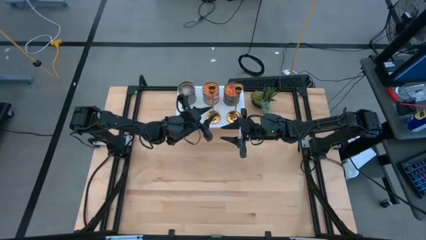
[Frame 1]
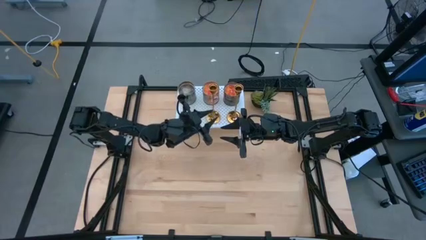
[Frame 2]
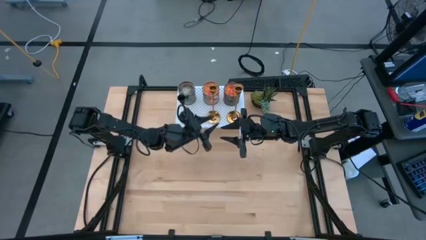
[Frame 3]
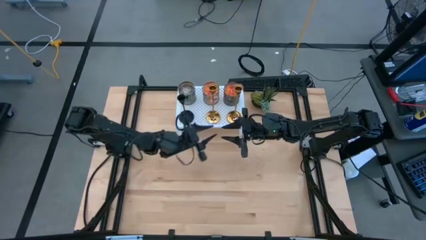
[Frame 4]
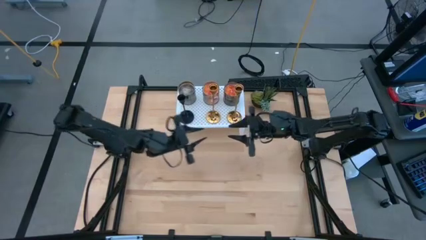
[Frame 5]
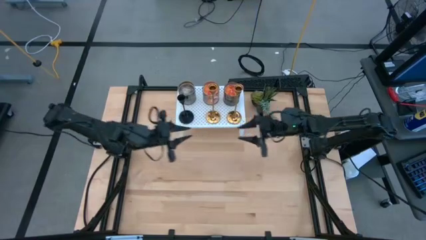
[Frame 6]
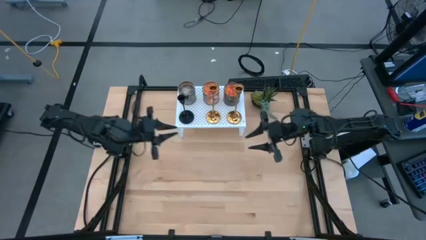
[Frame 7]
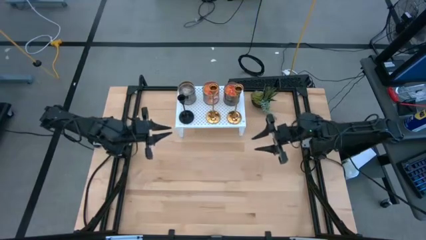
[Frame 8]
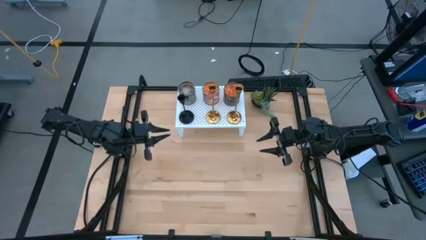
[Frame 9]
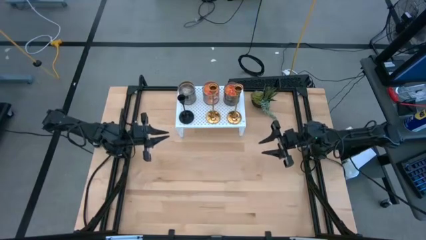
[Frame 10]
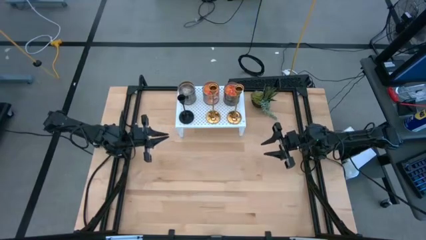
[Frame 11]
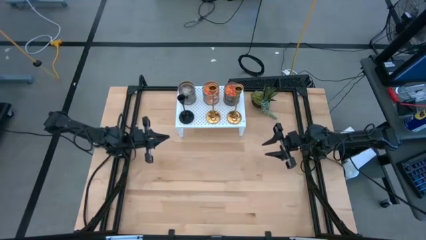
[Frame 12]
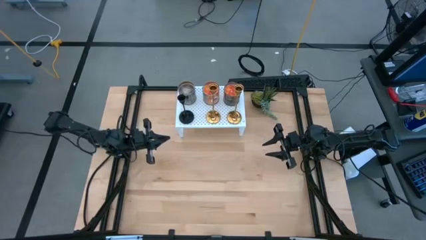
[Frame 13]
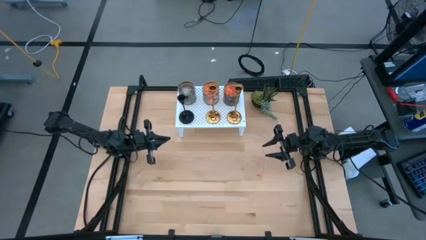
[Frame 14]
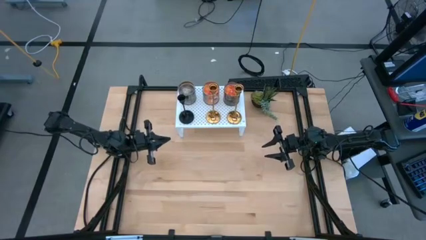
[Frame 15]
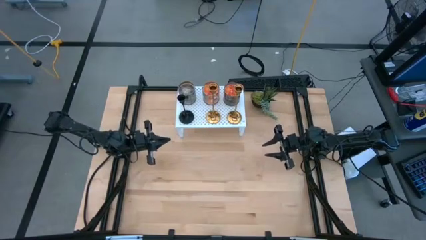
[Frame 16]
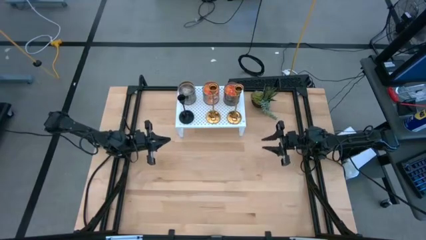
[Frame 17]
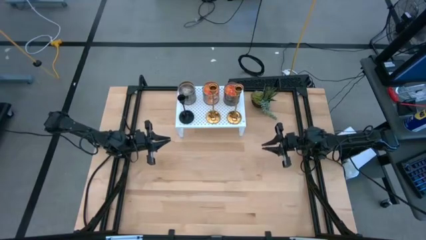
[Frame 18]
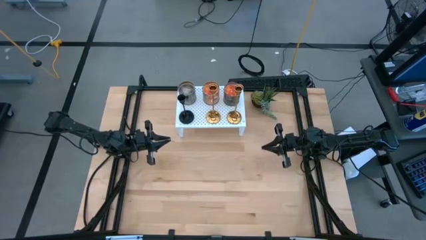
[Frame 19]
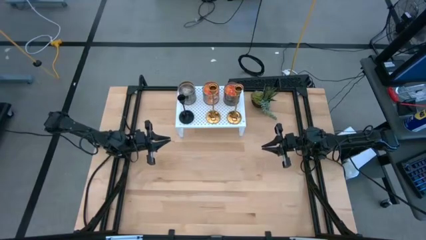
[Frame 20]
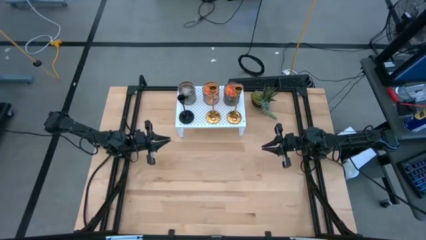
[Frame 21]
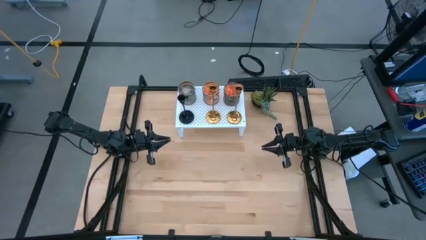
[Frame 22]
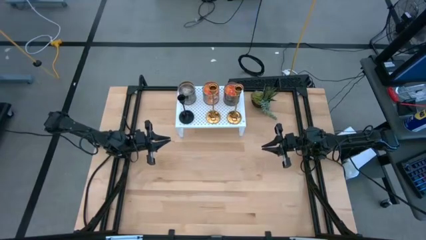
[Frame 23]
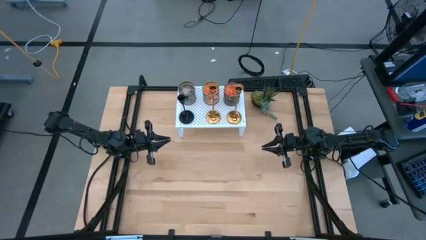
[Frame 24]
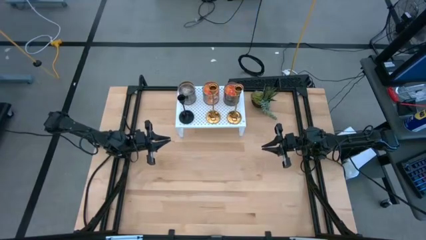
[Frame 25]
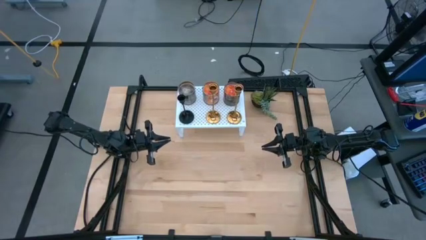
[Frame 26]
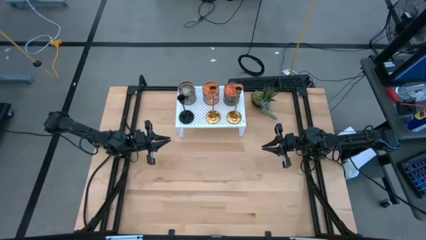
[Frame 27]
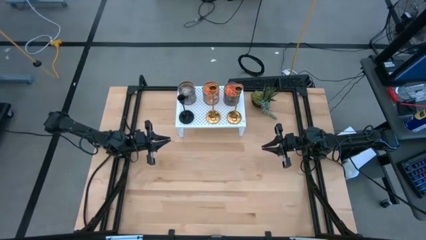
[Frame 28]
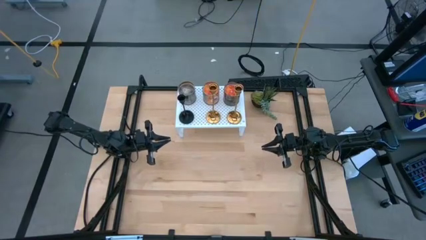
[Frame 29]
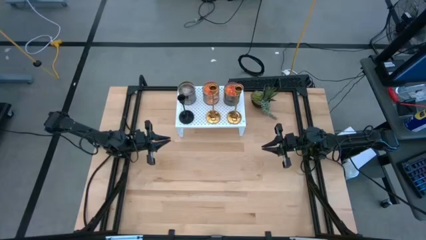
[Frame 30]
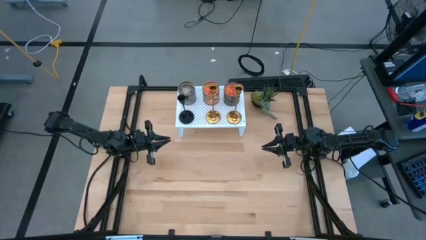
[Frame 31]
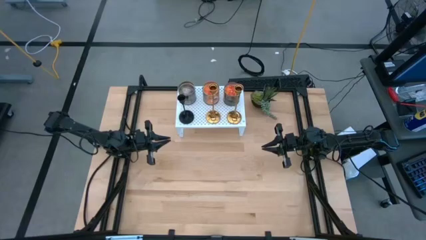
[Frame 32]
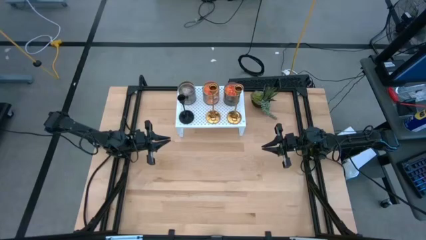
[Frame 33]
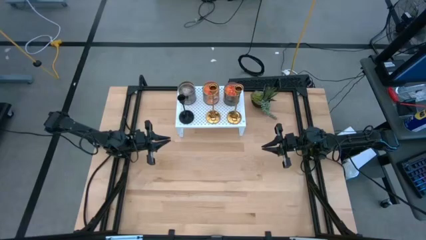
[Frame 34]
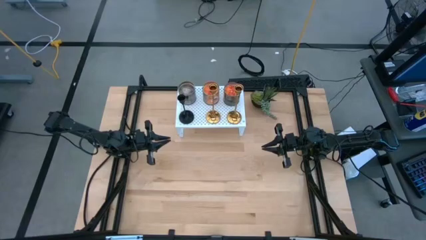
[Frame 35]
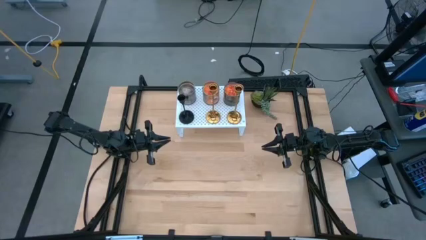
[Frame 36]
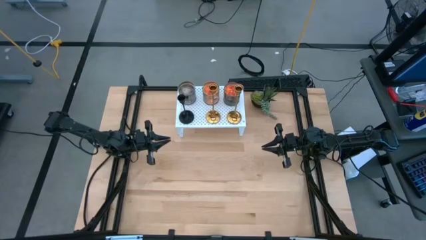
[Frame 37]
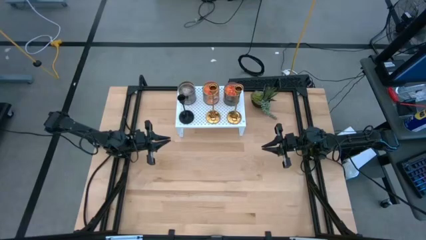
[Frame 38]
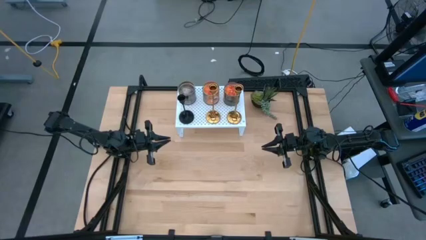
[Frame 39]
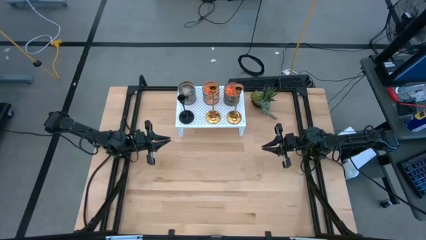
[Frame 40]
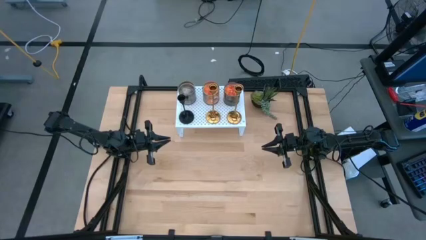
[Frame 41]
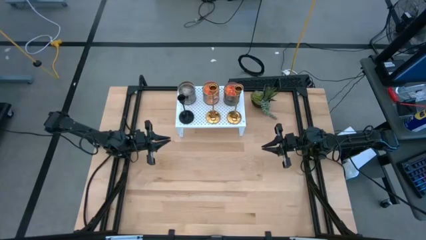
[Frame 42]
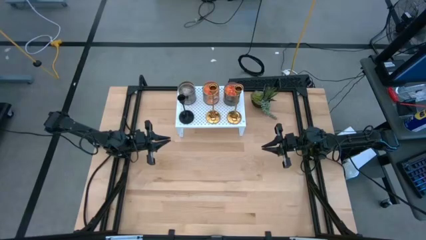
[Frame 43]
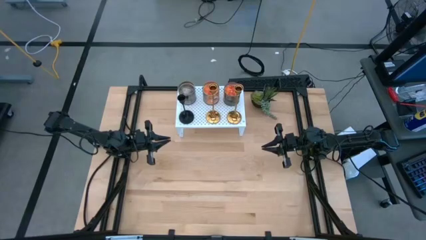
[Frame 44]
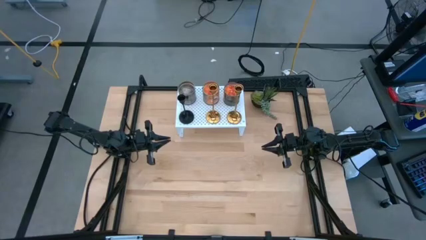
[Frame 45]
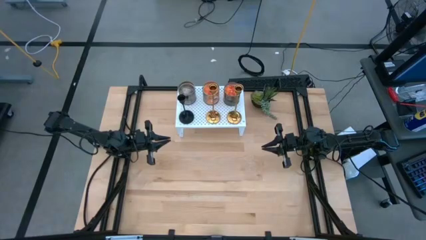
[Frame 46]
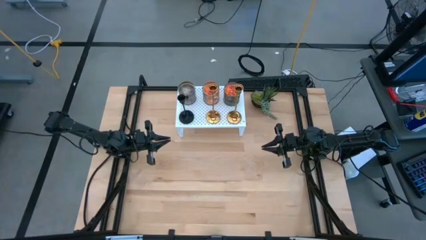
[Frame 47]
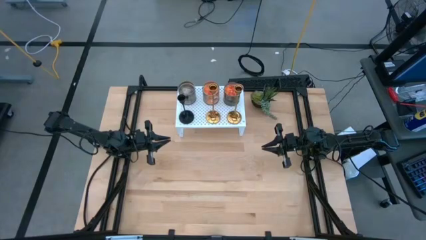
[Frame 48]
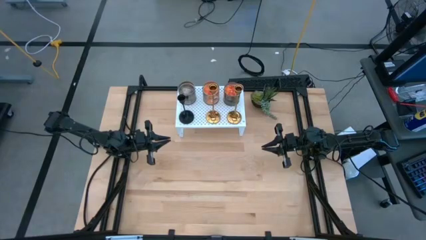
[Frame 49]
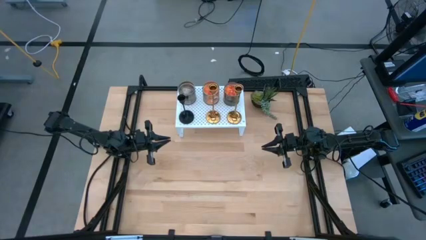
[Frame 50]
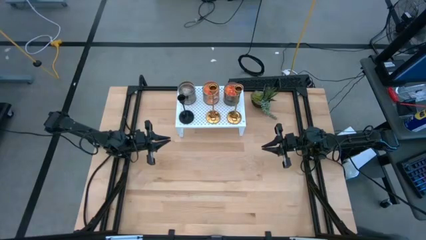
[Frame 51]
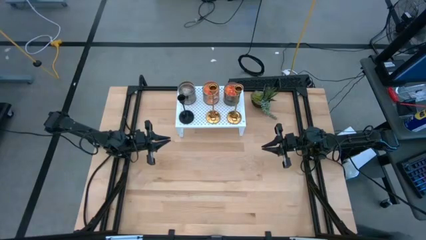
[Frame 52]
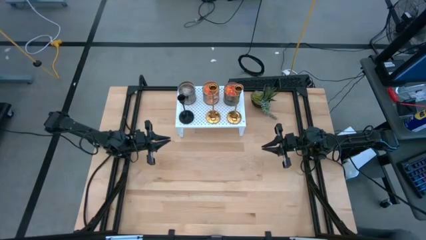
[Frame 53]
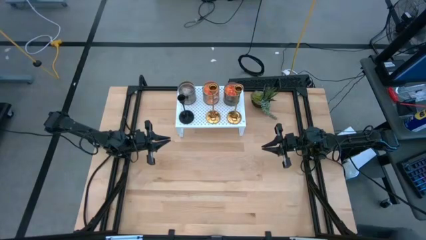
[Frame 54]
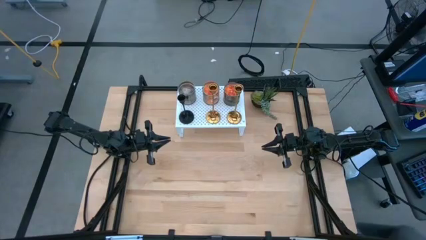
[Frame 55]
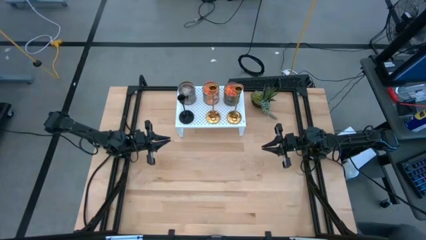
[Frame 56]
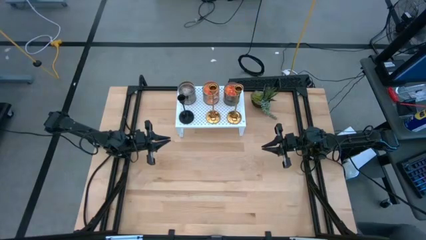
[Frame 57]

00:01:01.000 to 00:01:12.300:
Task: Pick & Place candle stick holders
Return to Home Position

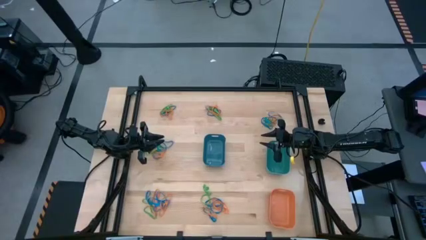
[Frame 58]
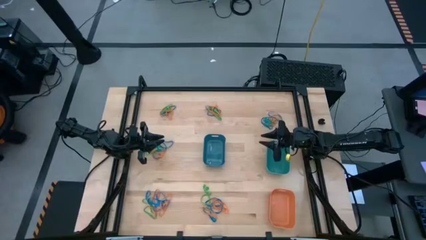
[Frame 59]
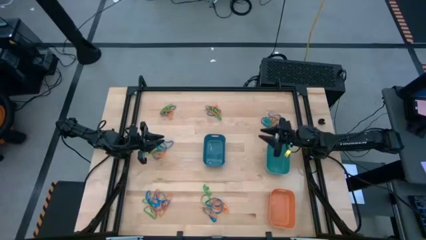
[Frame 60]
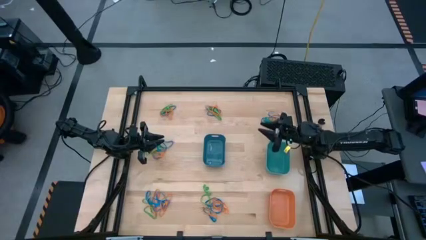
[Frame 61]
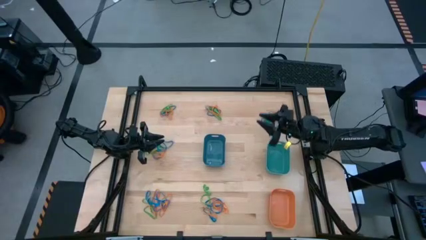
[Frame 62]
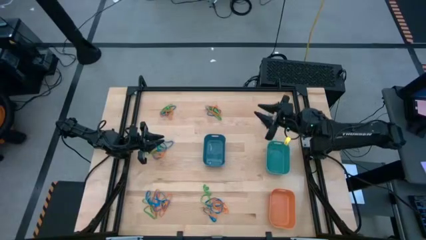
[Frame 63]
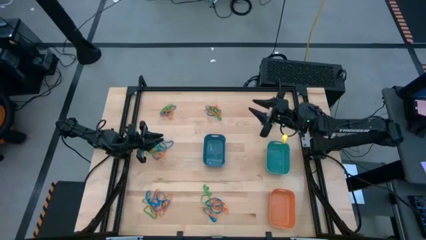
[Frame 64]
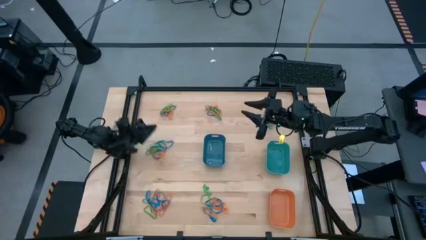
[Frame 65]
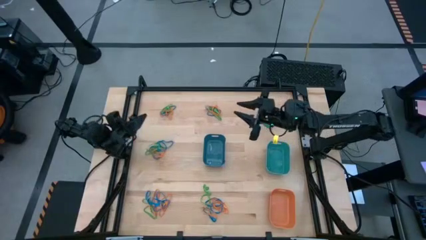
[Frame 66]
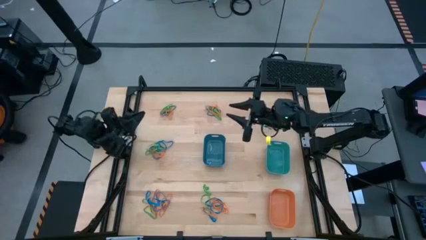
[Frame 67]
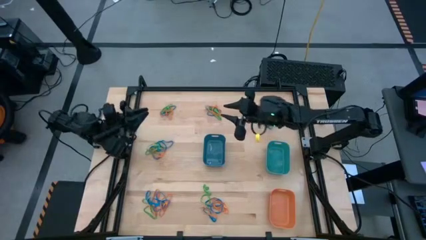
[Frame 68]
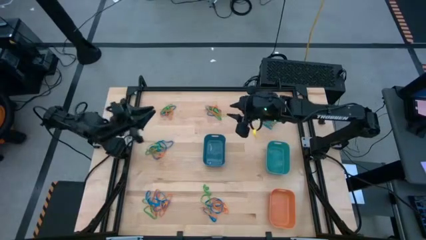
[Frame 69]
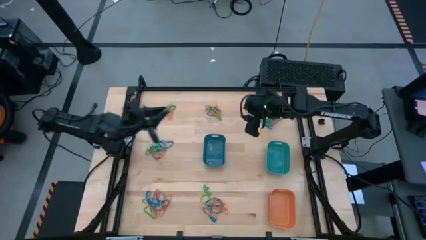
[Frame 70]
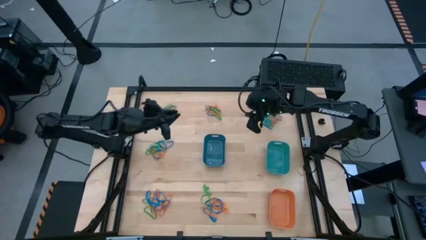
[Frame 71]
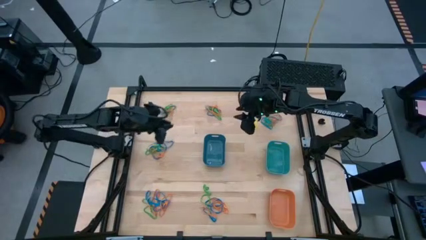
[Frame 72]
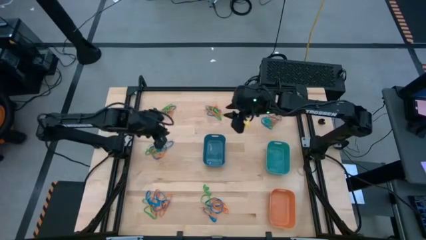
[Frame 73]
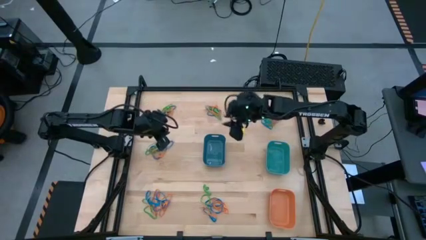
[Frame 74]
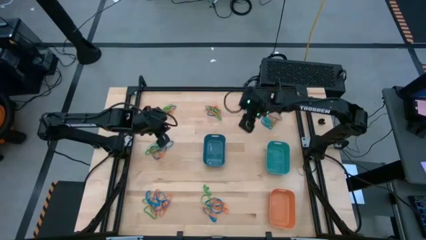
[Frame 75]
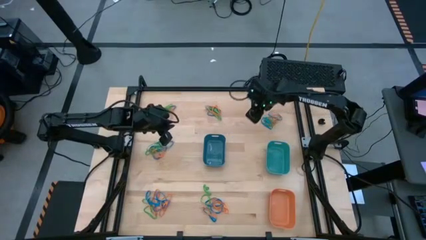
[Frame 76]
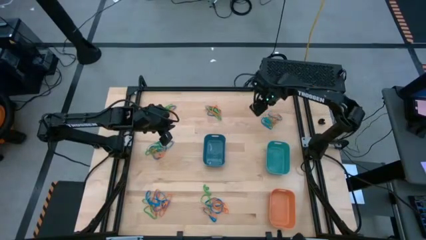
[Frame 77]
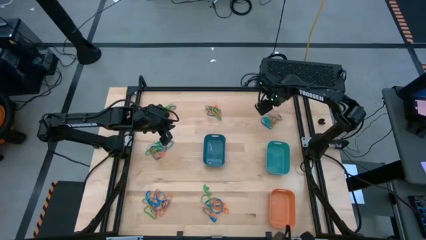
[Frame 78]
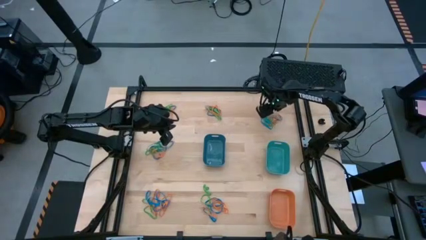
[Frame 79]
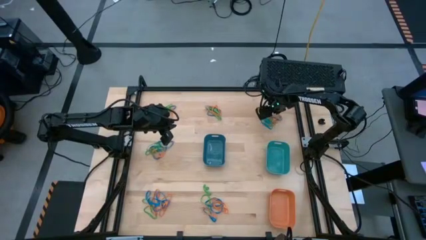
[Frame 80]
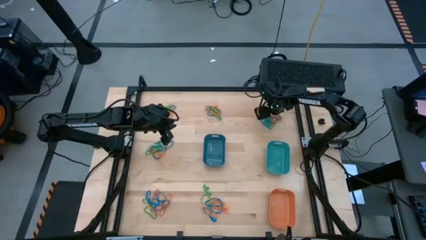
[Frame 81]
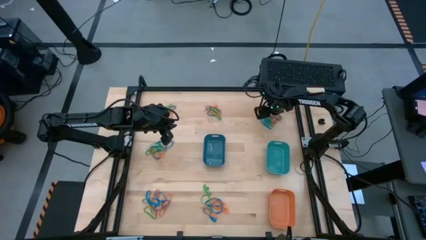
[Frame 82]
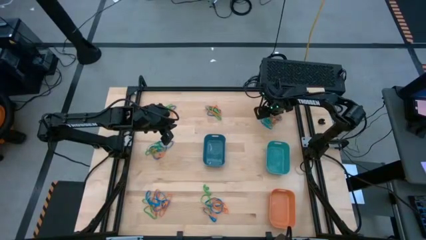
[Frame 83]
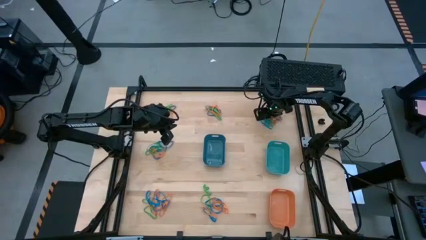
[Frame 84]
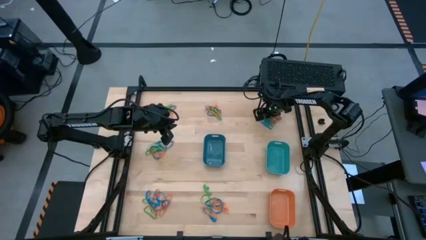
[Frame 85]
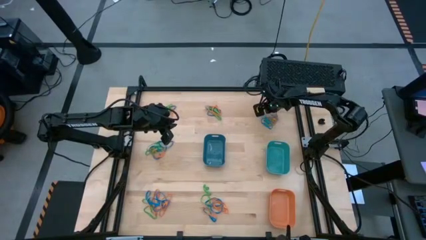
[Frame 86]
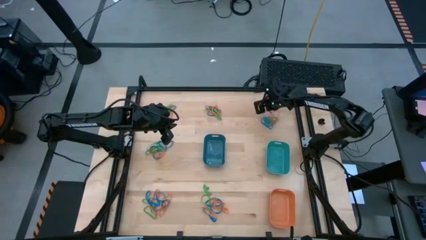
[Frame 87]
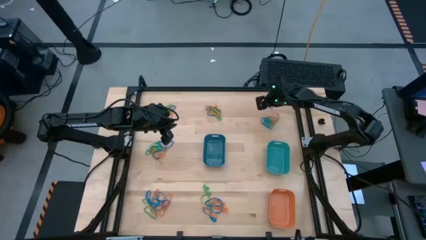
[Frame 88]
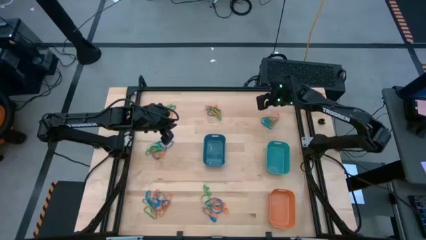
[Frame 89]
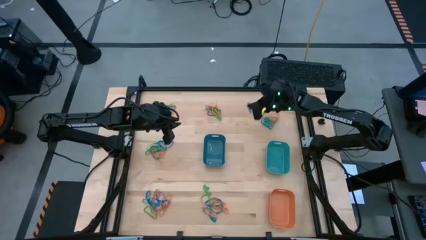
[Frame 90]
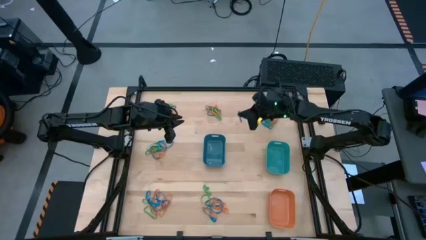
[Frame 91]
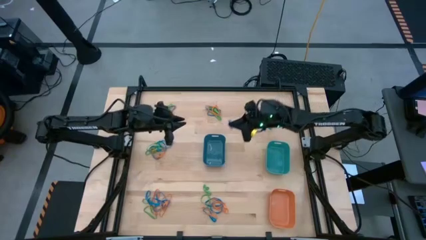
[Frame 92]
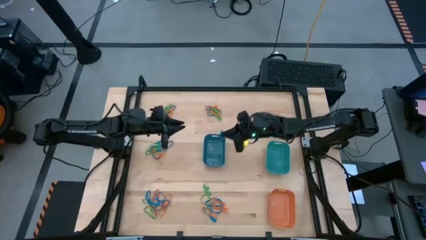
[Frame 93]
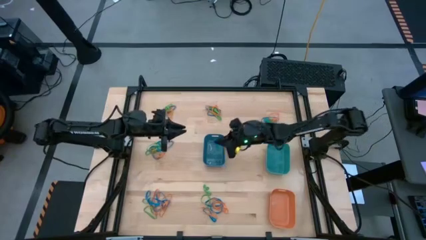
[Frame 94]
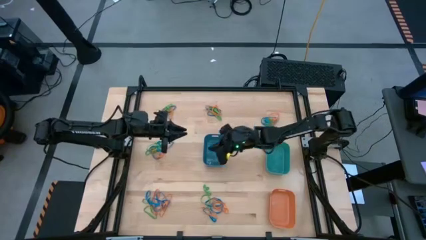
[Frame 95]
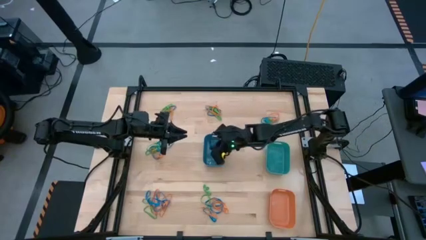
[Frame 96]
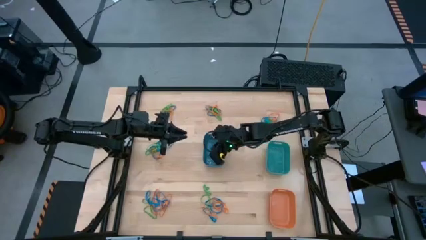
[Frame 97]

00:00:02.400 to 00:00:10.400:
Task: Sort rubber bands into baskets
Put the blue rubberband into the blue bin
